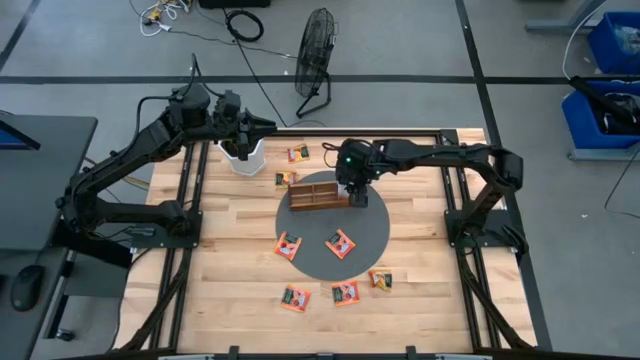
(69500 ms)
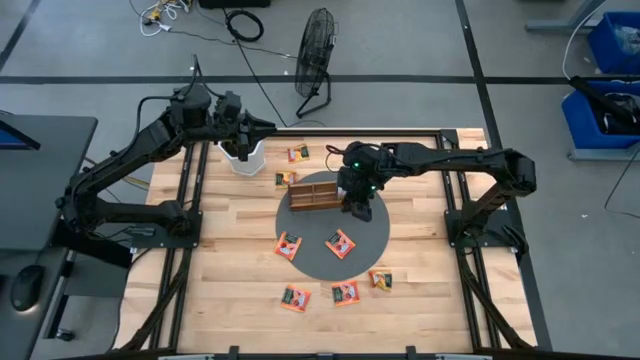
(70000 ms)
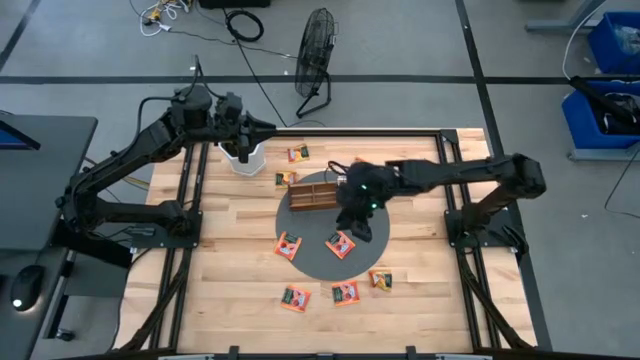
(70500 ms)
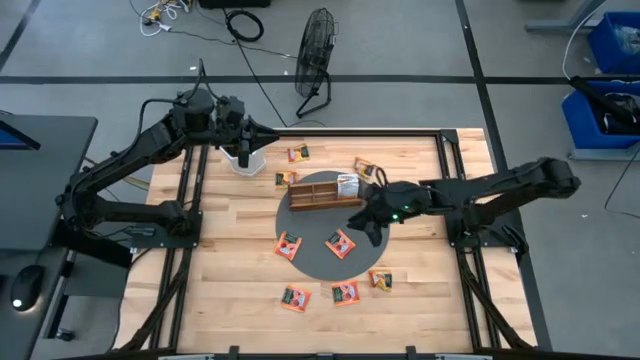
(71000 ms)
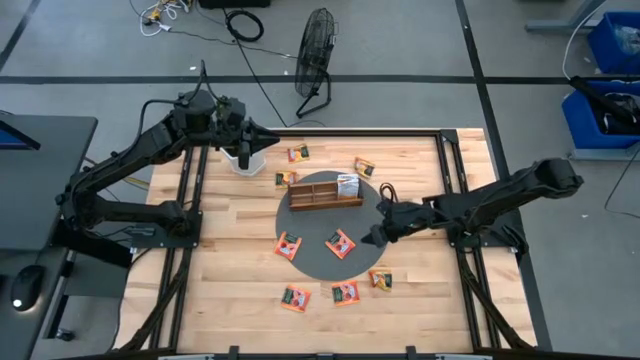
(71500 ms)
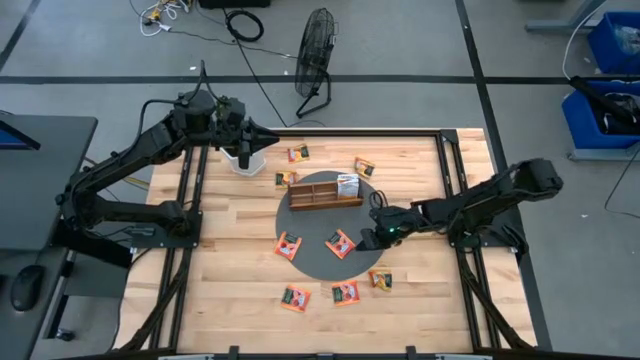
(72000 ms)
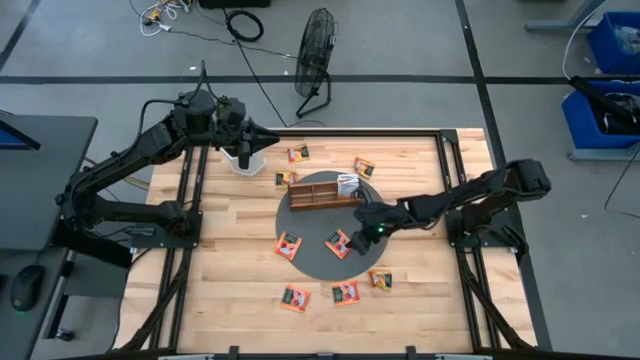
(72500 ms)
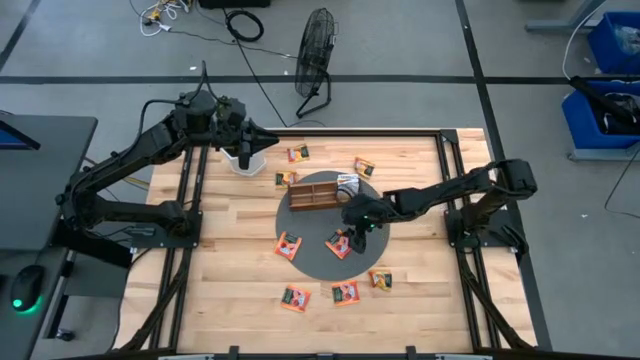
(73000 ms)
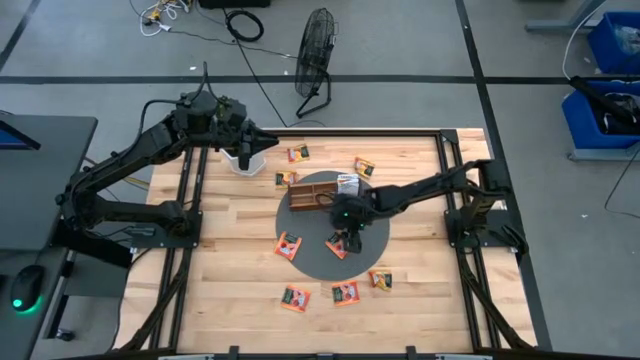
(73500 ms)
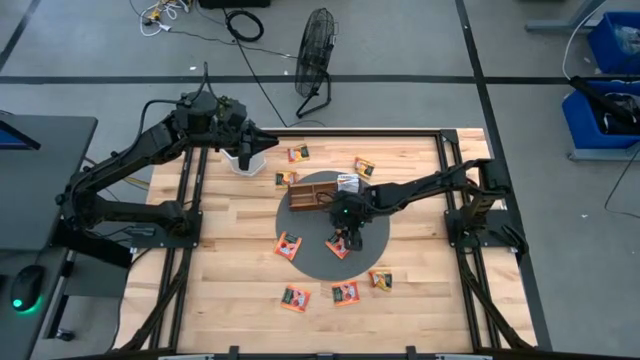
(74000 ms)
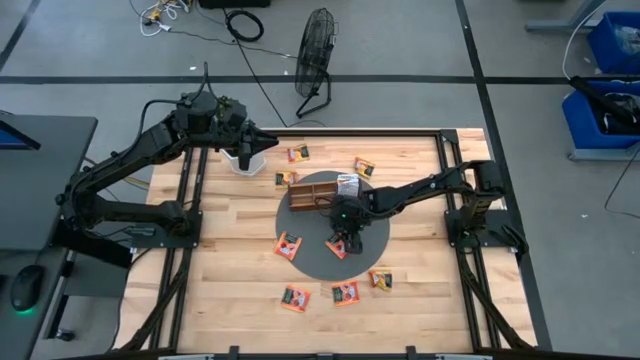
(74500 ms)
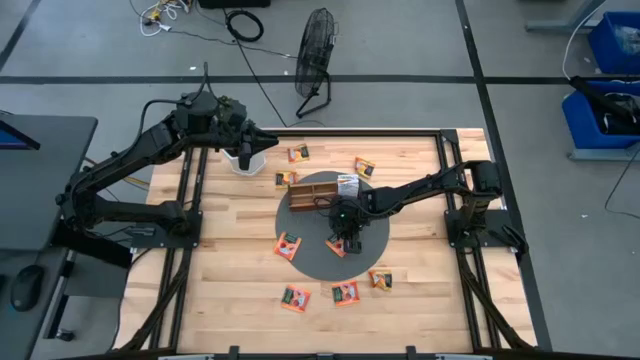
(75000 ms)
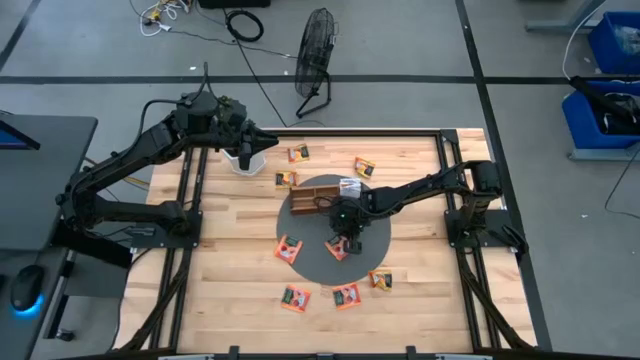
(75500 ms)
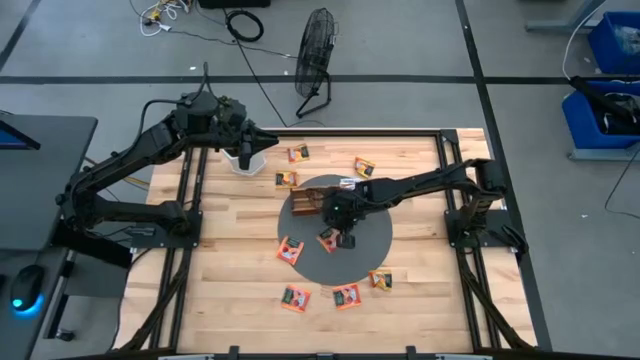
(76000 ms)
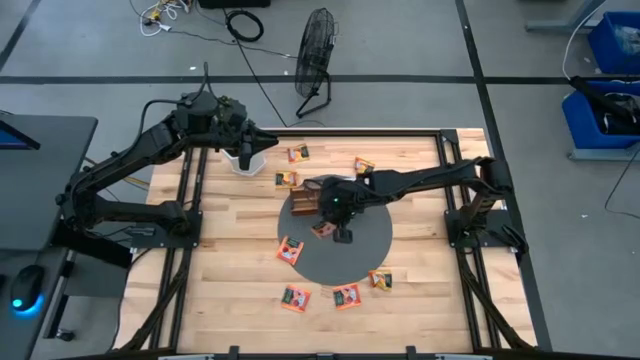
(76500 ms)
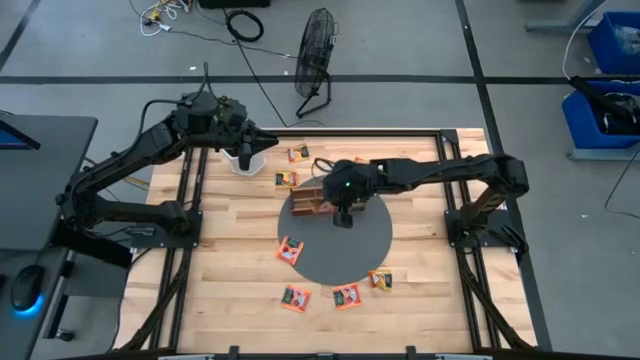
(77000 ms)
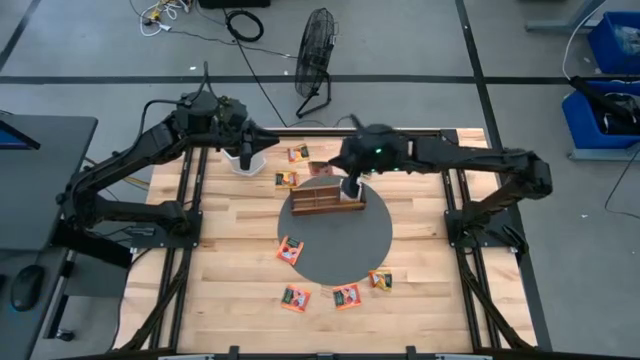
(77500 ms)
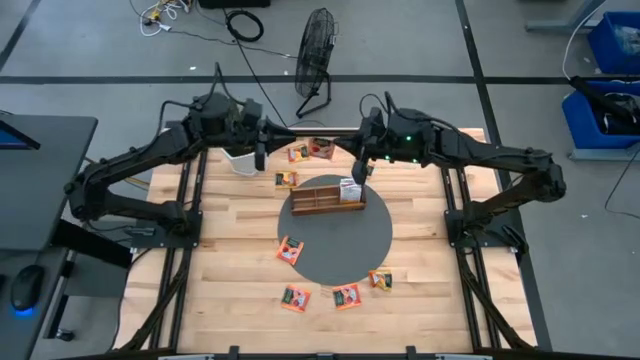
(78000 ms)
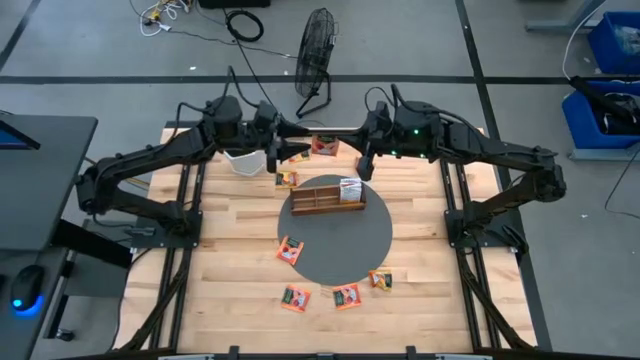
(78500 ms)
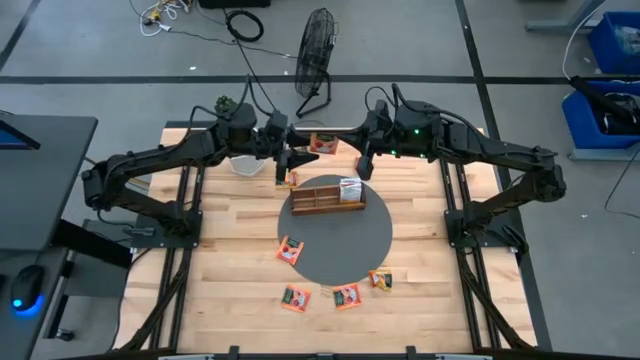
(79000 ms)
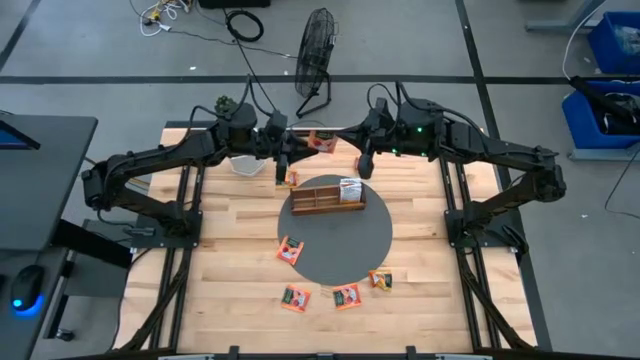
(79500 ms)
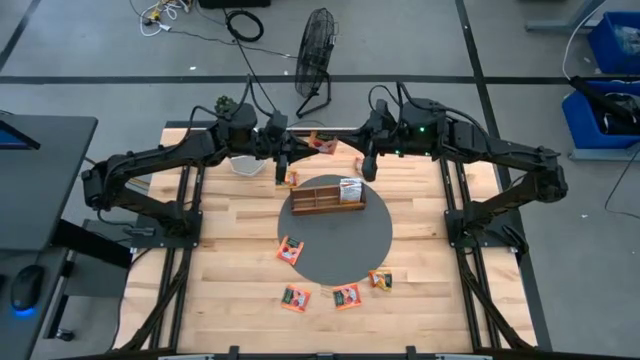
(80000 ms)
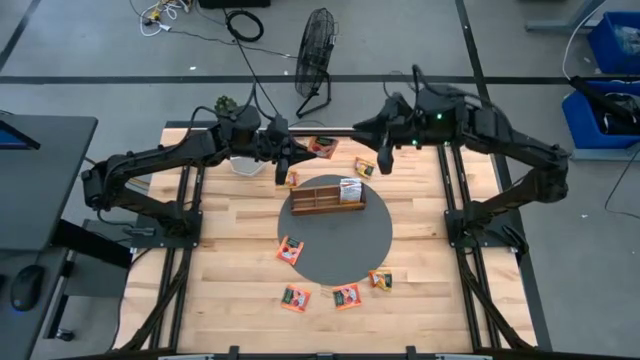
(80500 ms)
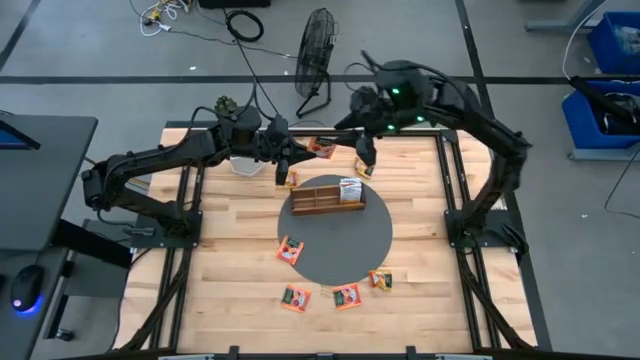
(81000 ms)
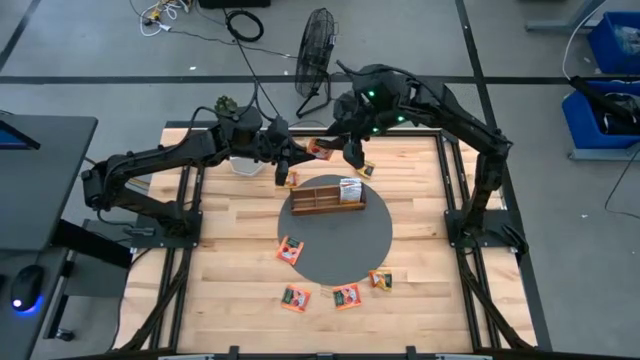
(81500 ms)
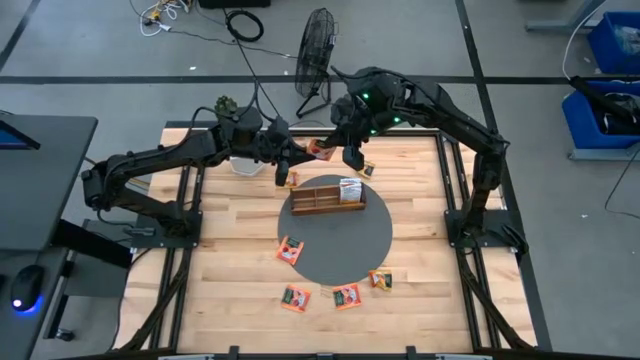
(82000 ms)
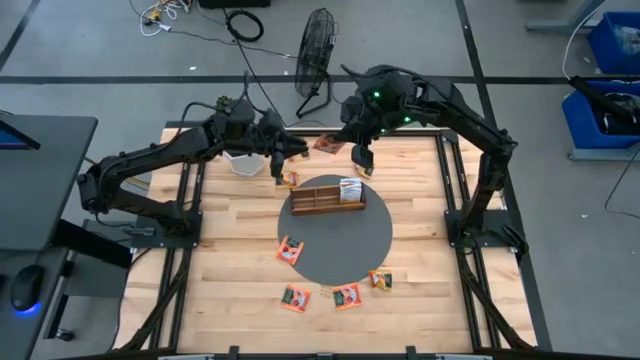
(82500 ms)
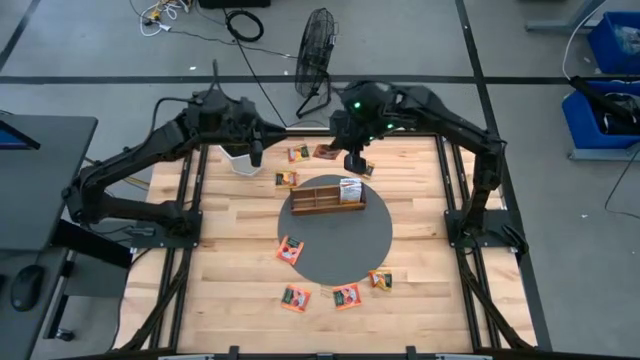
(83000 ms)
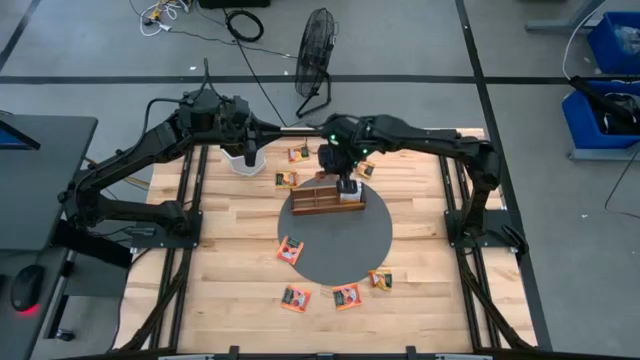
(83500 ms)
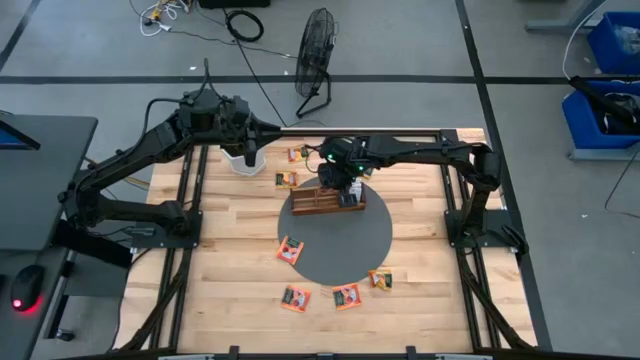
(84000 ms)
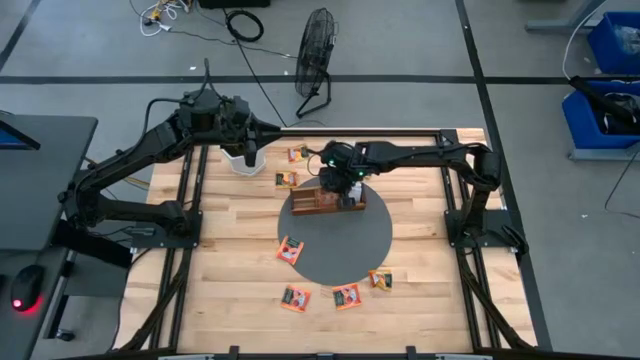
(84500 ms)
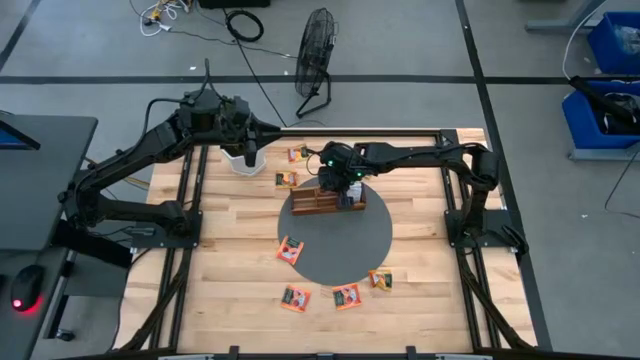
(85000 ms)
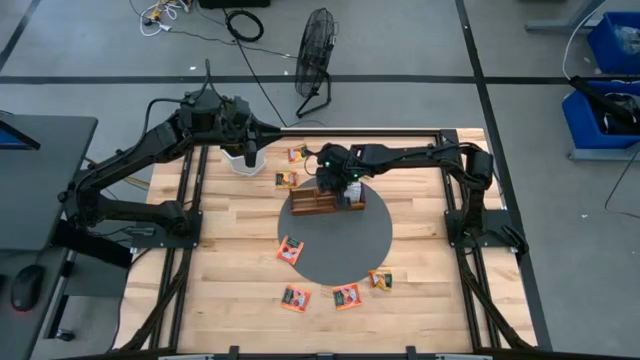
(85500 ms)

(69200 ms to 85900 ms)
Task: Pick & Place Tea
Put the pink tea bag into the middle section of the wooden organizer

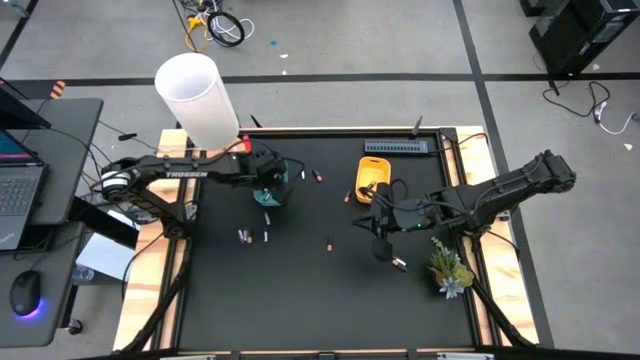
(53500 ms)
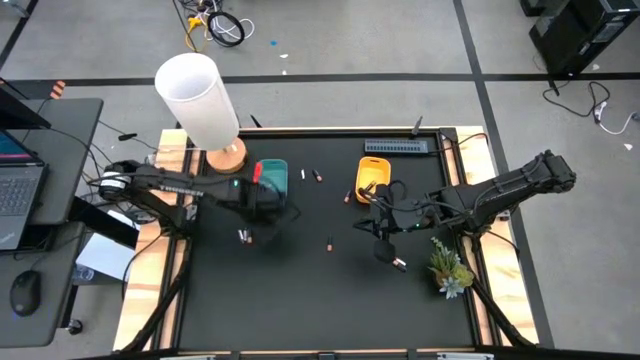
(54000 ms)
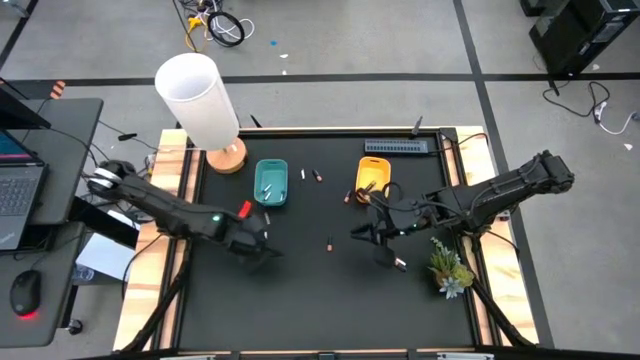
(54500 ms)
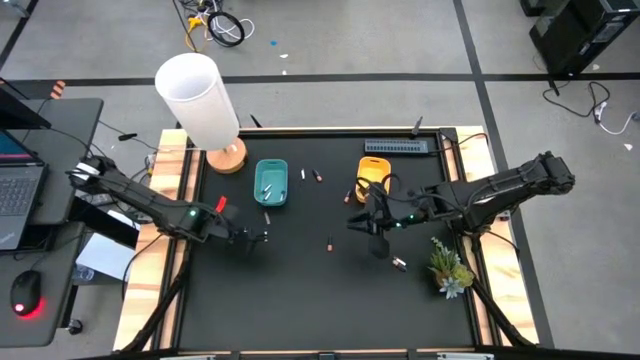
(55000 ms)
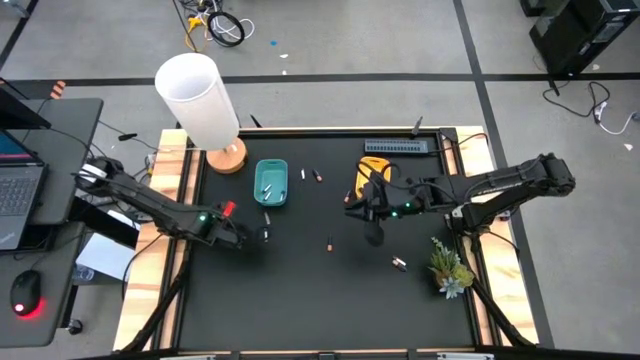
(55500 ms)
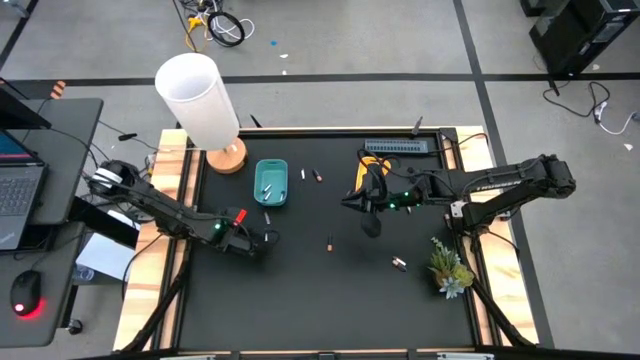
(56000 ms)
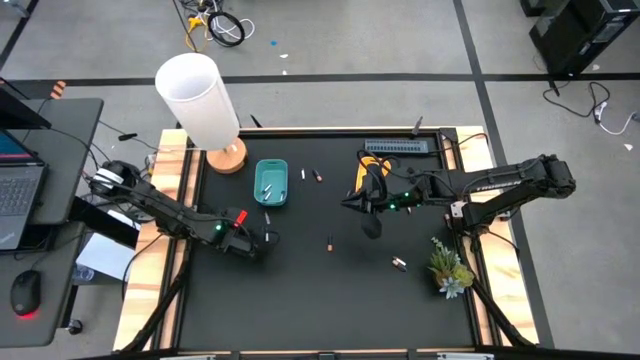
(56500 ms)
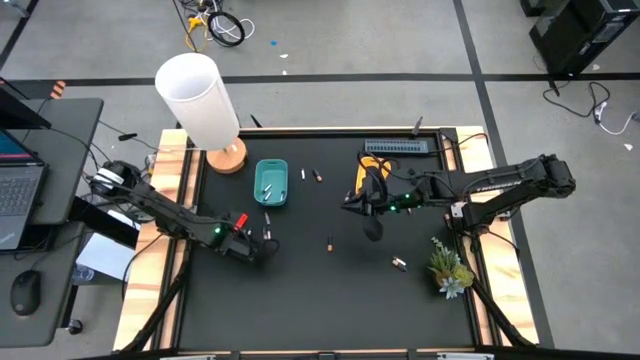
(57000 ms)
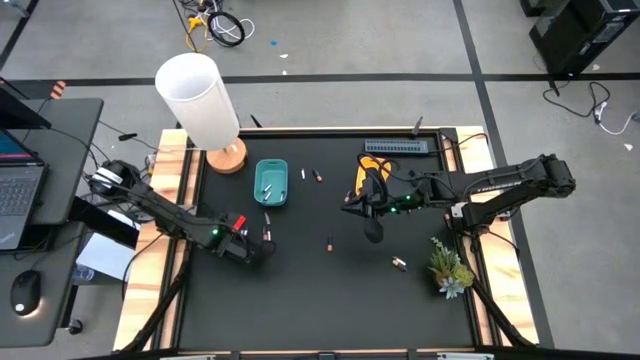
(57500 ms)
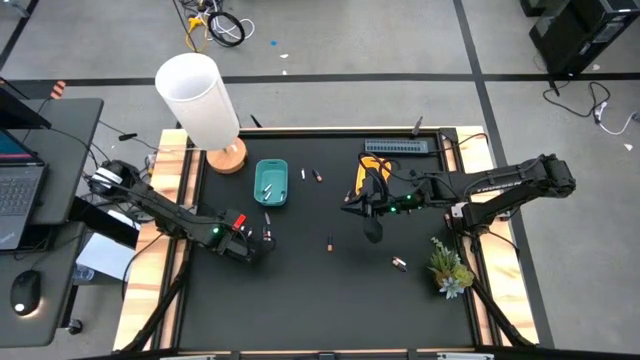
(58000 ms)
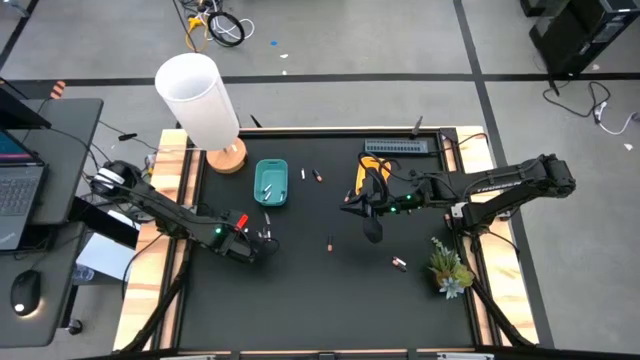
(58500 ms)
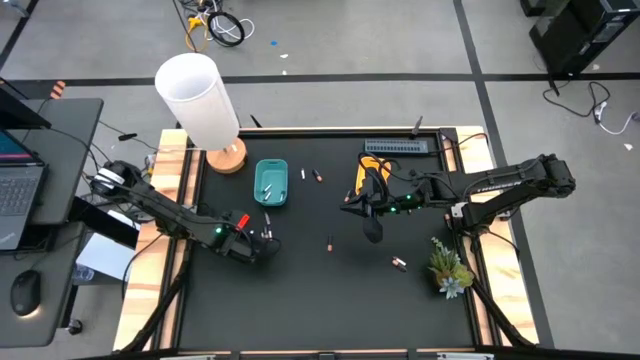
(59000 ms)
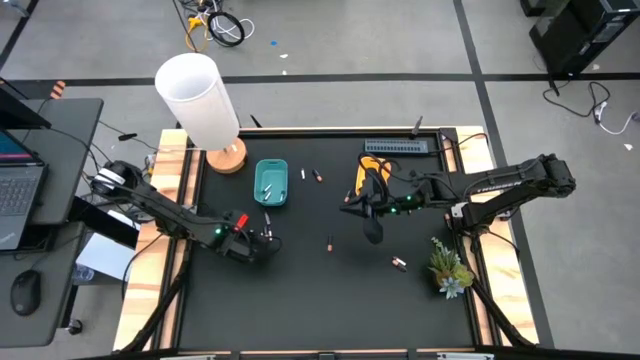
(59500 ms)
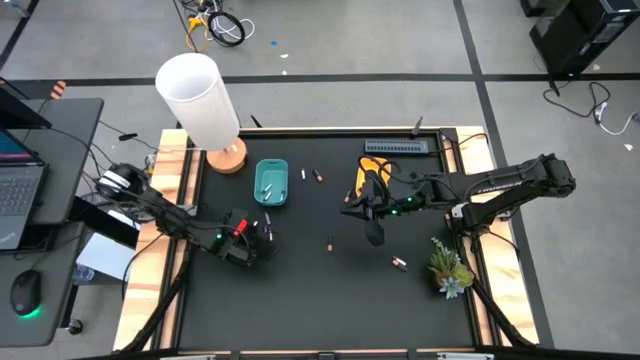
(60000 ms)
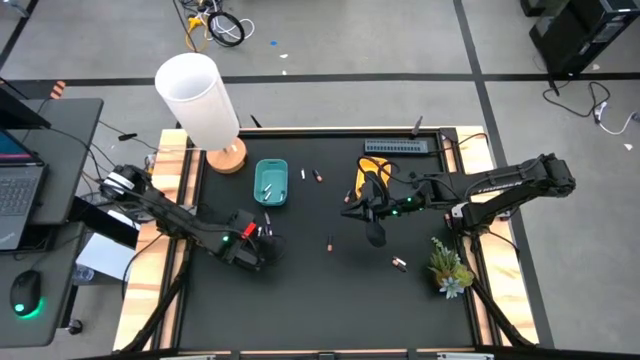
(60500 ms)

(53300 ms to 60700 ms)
Task: Sort batteries
Put the silver battery into the blue bin
